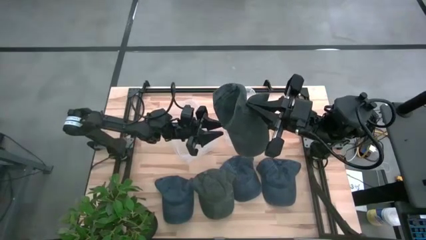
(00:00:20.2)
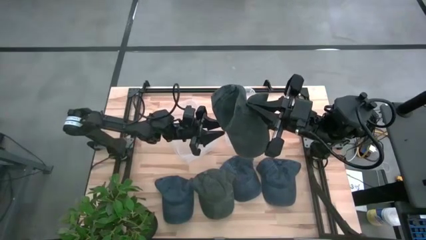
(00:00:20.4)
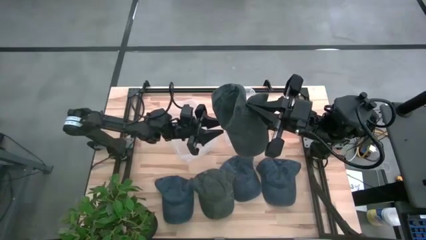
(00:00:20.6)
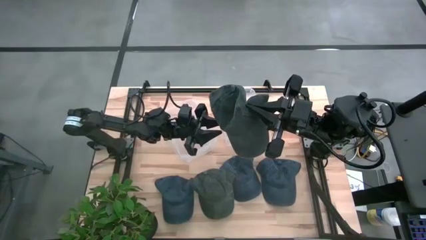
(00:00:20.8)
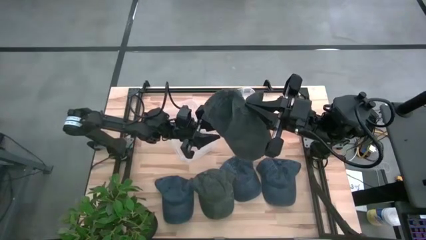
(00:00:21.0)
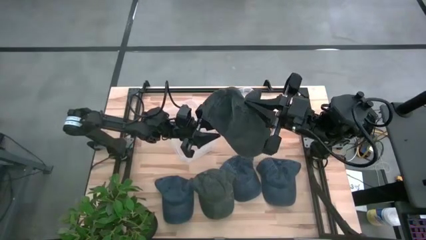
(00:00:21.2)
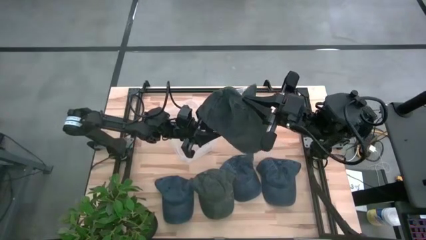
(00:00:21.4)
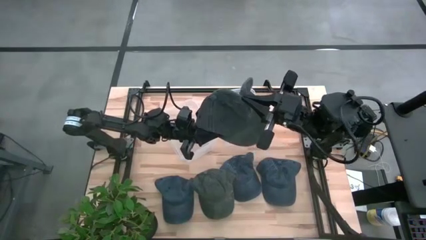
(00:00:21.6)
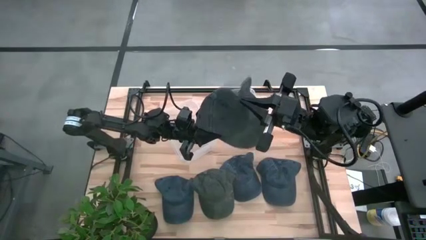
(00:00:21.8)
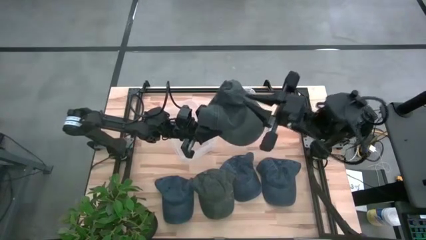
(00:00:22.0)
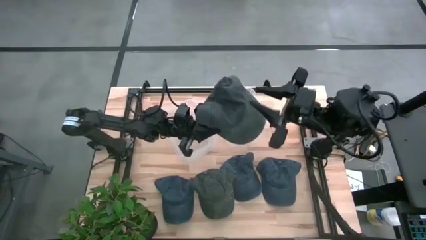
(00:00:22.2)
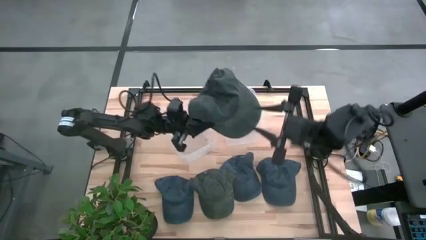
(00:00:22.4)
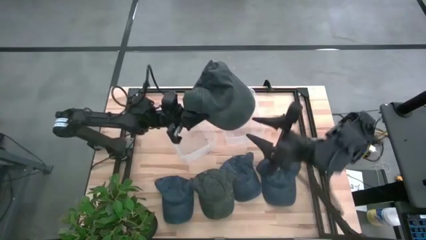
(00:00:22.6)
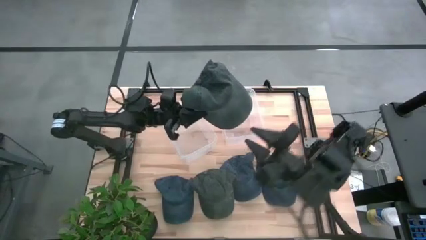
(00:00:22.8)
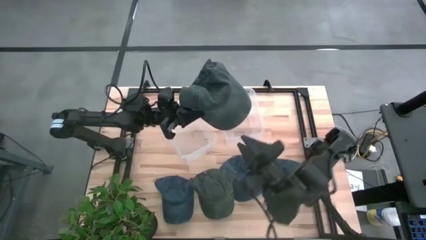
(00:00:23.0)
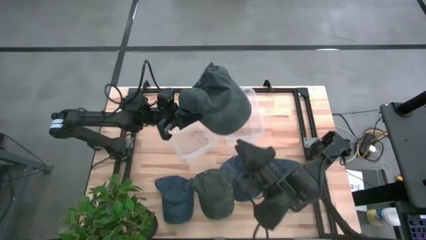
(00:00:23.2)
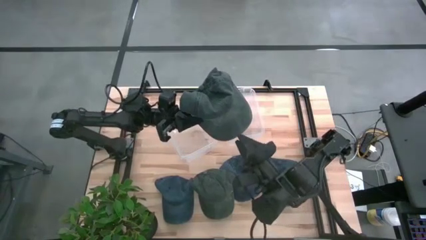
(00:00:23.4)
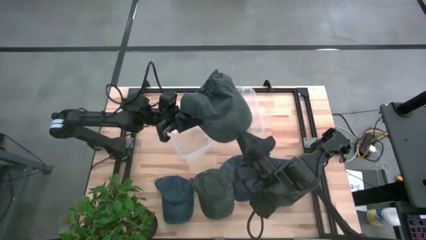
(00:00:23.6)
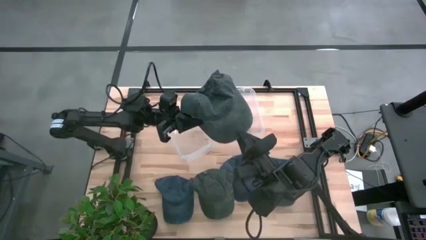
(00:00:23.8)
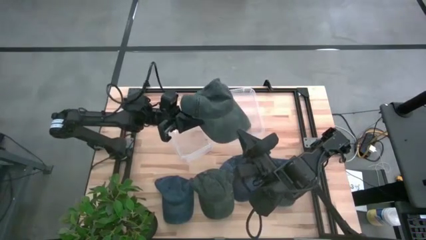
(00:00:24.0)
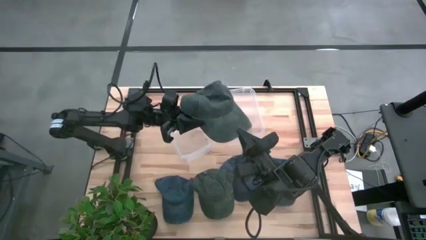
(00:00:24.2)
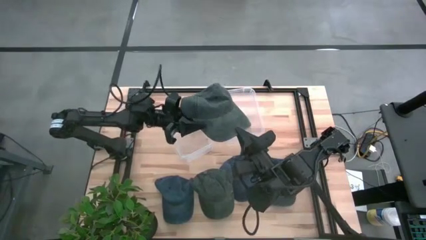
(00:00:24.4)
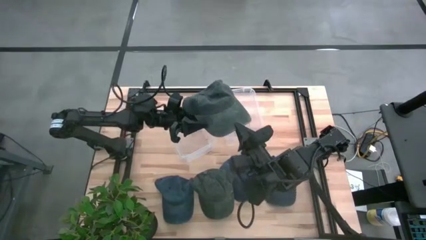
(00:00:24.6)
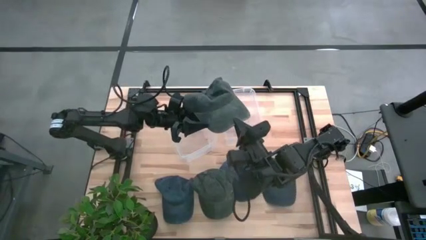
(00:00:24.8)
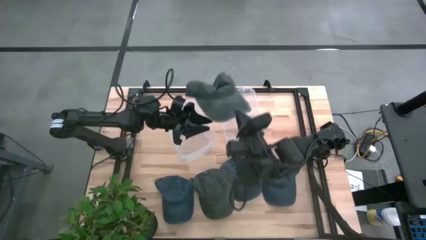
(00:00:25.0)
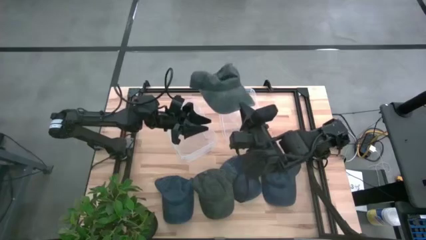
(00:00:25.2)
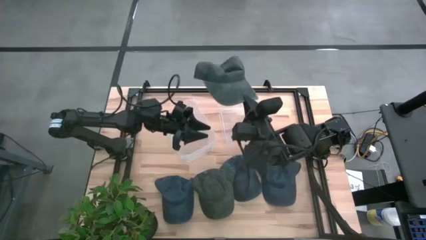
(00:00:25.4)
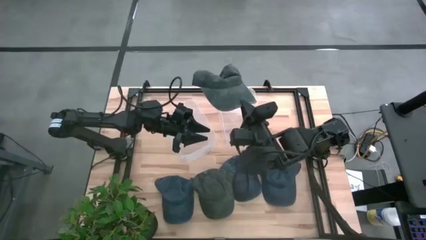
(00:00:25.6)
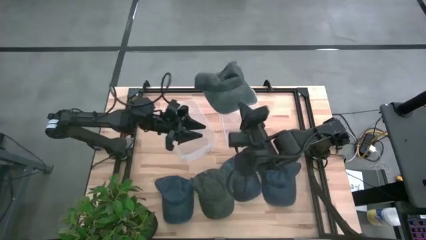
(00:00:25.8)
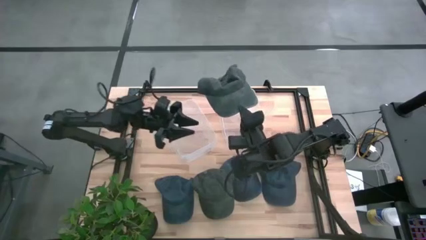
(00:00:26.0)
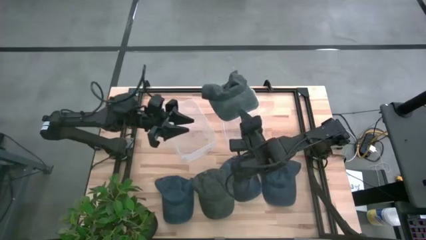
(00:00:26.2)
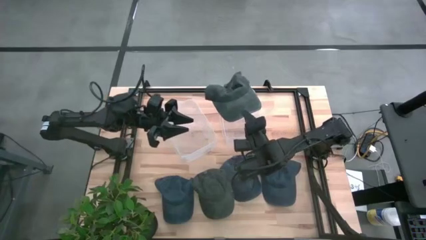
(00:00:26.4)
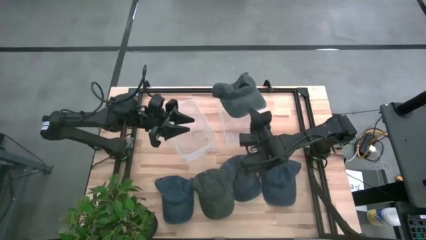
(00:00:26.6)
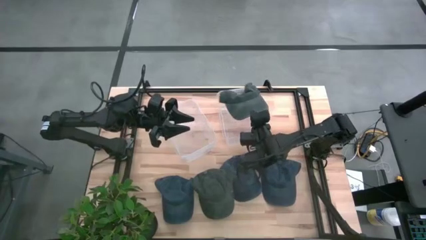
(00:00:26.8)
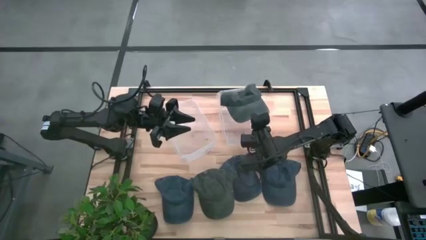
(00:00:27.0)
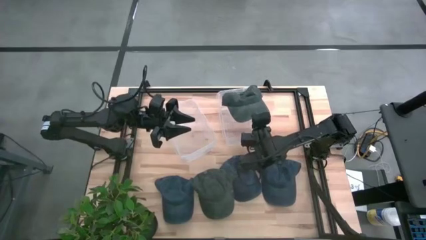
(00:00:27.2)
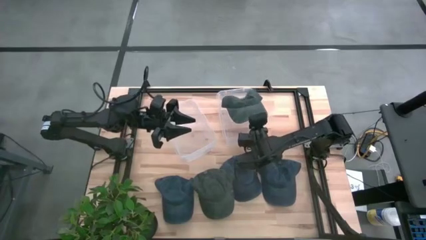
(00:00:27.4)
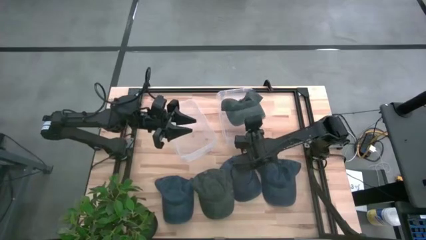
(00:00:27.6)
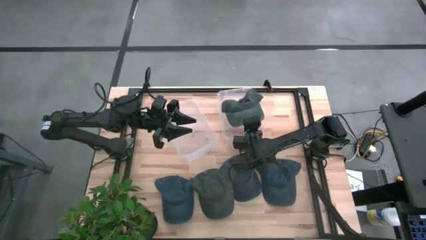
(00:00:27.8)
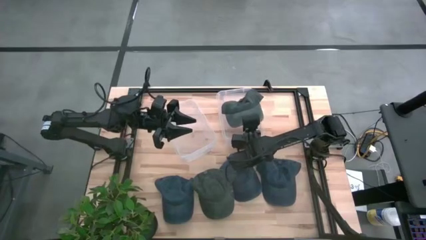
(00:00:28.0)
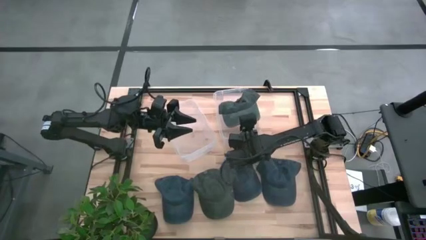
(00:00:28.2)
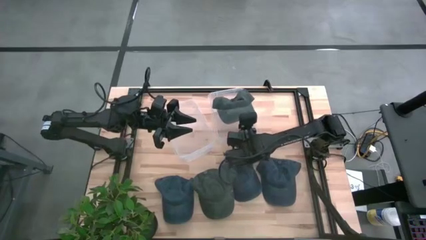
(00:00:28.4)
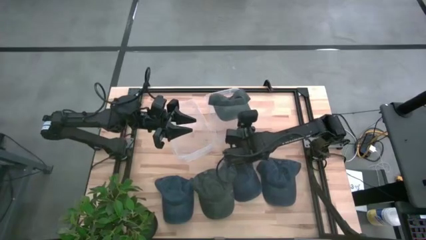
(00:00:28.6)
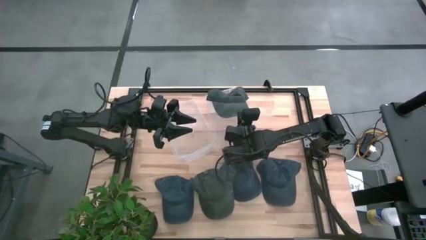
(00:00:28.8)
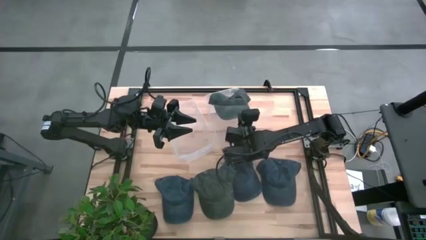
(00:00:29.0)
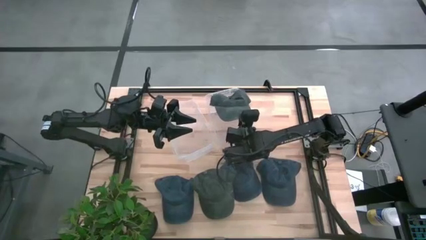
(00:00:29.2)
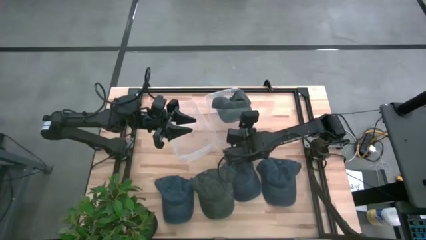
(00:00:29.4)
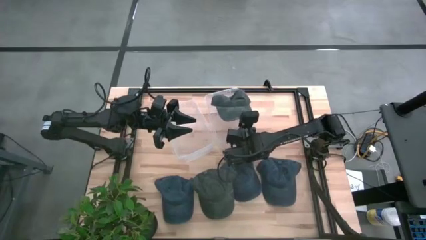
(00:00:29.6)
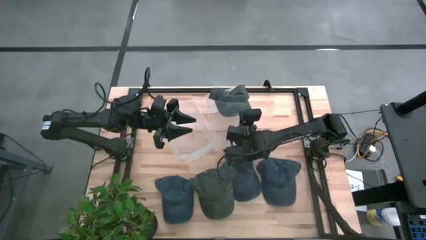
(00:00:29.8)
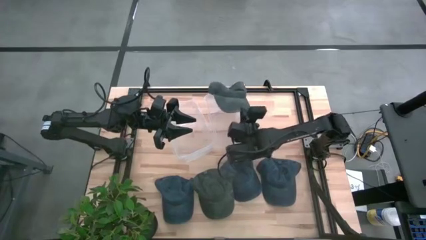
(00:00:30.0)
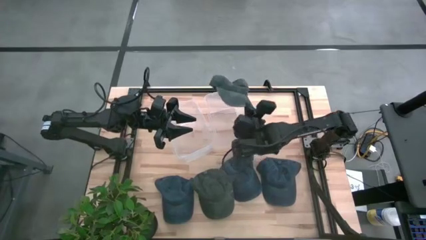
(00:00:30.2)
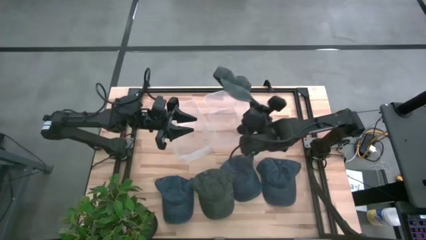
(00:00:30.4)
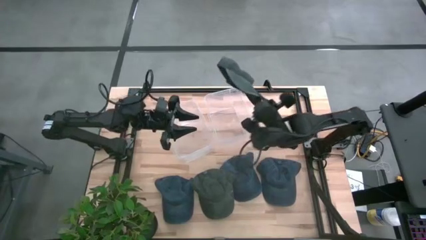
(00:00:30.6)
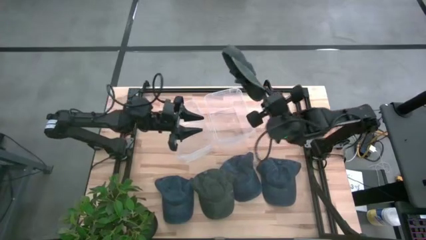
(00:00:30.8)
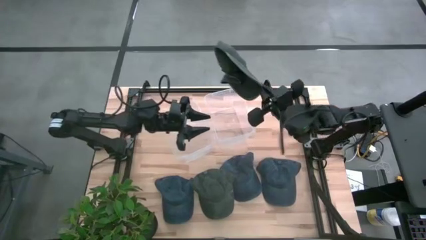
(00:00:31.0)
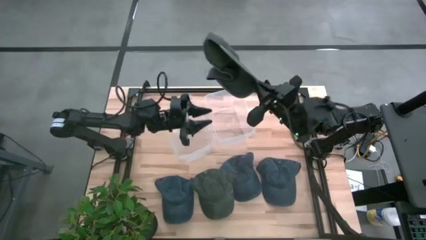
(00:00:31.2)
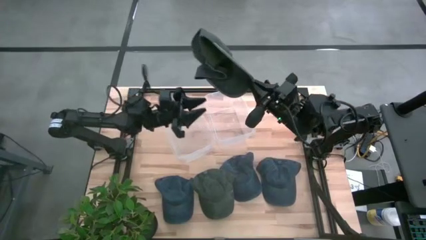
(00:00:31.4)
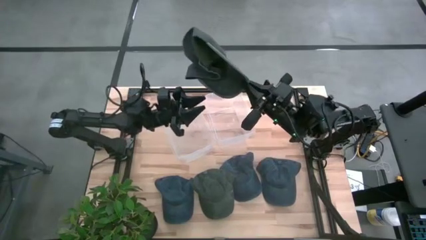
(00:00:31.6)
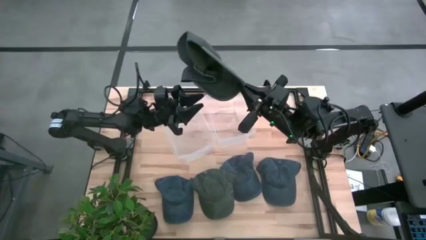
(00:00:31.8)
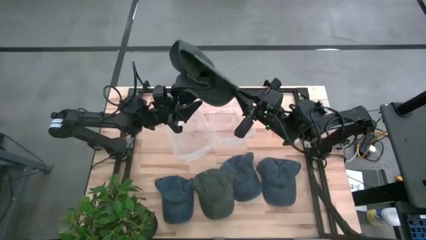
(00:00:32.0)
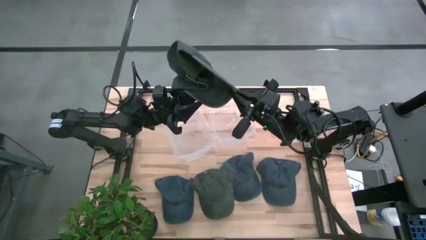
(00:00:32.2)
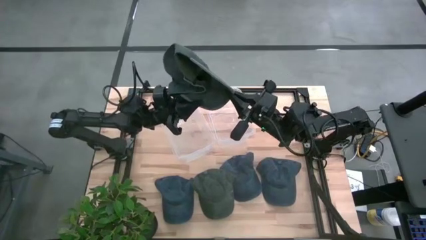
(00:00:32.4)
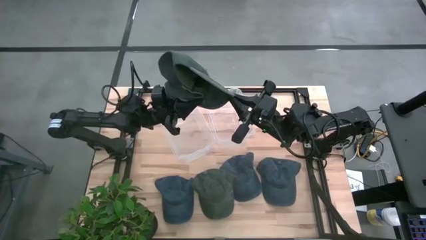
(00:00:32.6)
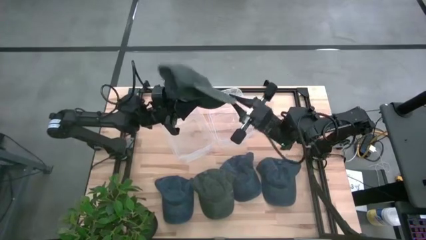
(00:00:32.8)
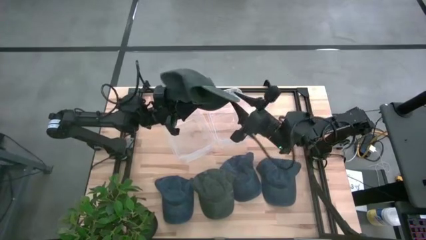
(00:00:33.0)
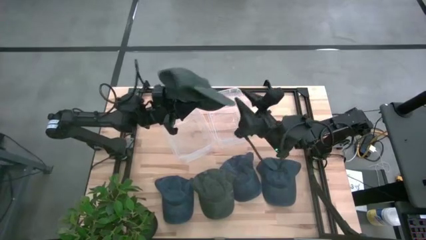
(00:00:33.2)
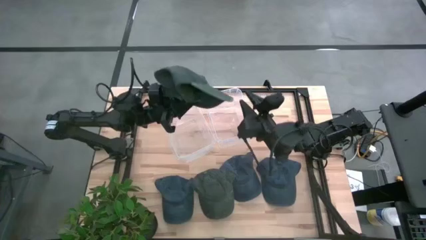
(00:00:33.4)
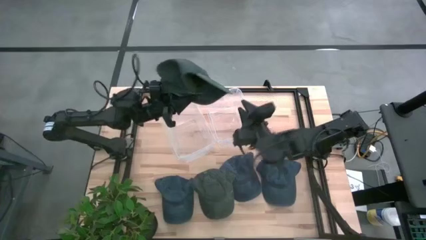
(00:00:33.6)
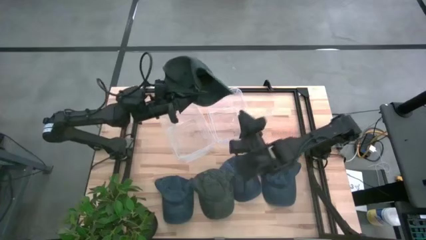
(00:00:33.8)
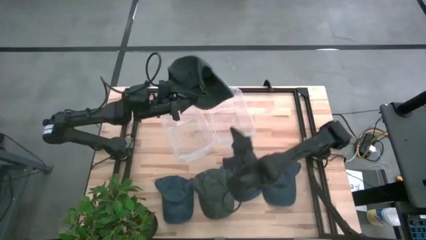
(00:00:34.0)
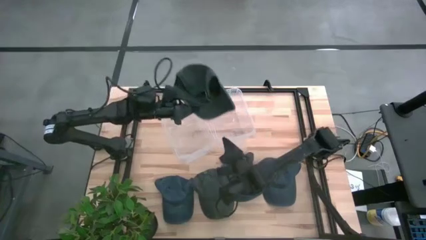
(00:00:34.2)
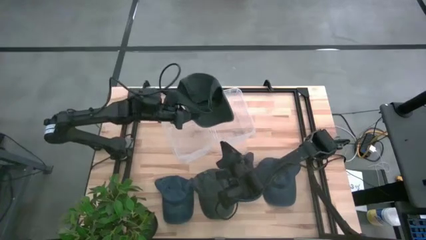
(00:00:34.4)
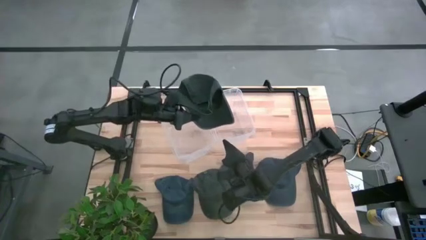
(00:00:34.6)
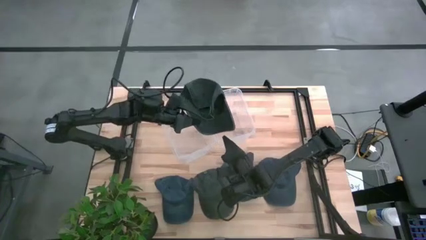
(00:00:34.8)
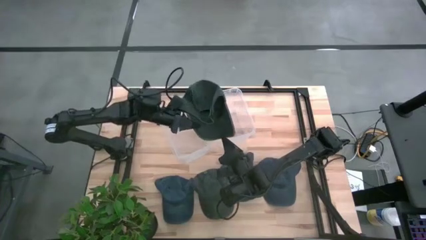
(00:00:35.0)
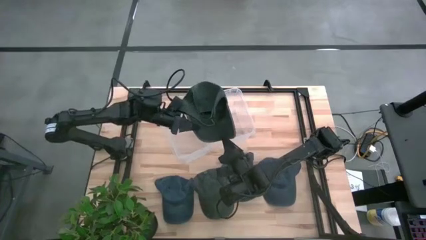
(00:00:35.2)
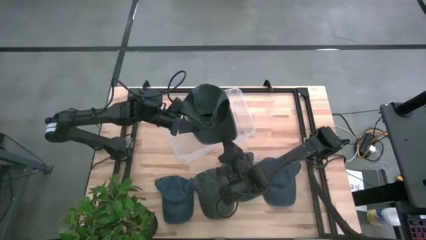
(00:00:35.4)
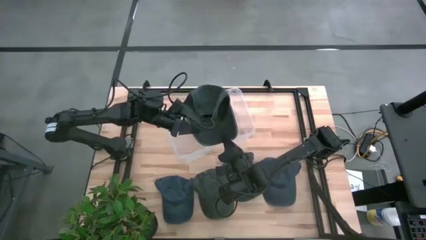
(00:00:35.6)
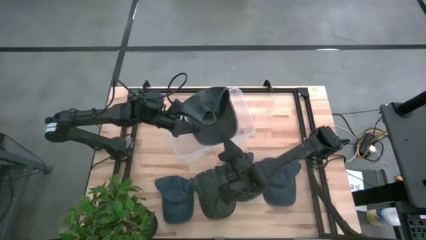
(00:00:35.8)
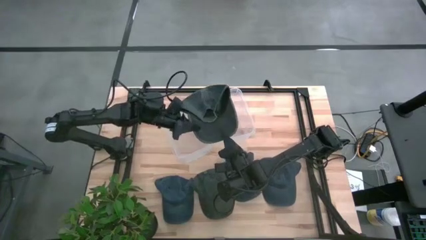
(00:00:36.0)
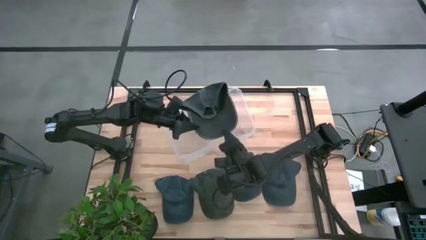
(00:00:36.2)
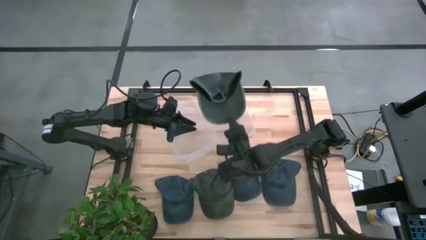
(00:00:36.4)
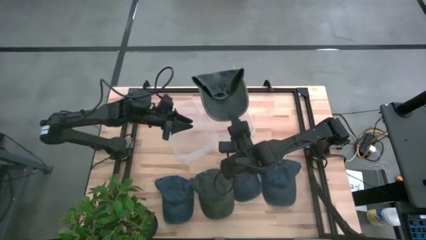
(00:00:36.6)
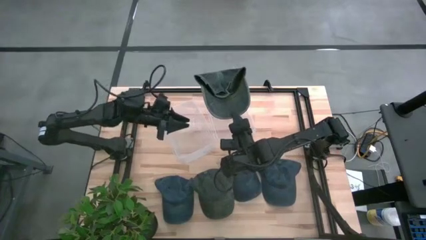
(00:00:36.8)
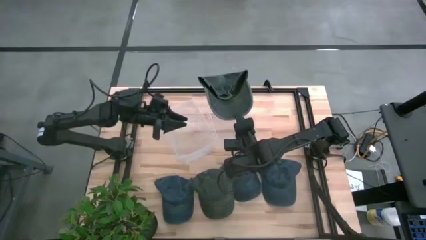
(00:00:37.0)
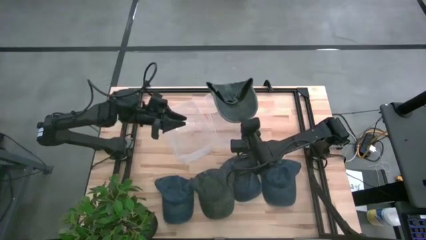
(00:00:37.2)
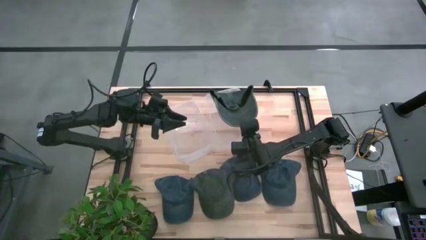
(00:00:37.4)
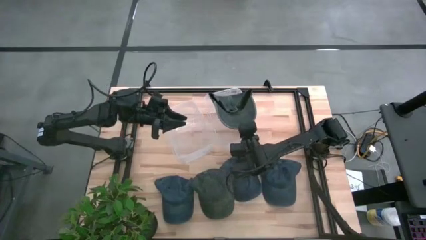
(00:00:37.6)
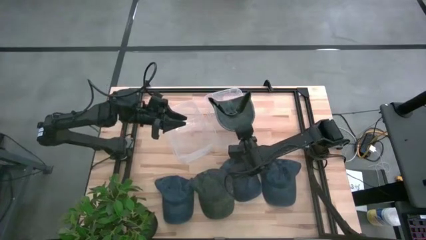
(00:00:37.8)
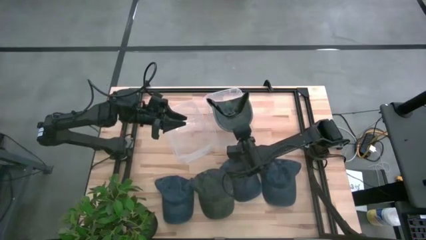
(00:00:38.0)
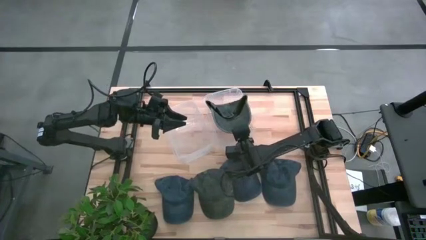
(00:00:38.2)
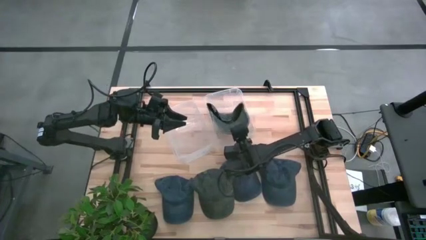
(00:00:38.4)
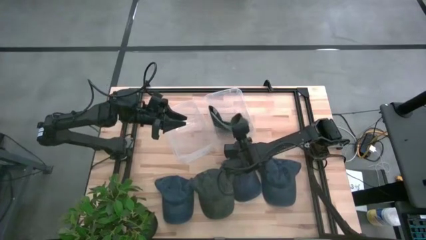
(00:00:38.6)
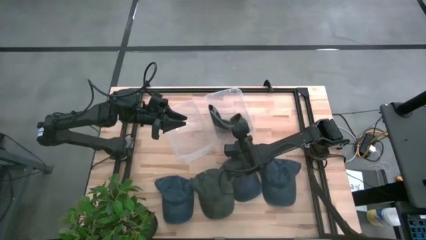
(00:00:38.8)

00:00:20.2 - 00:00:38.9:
Task: Pick & Place hat
Put the left dark green cap into the right transparent bin
